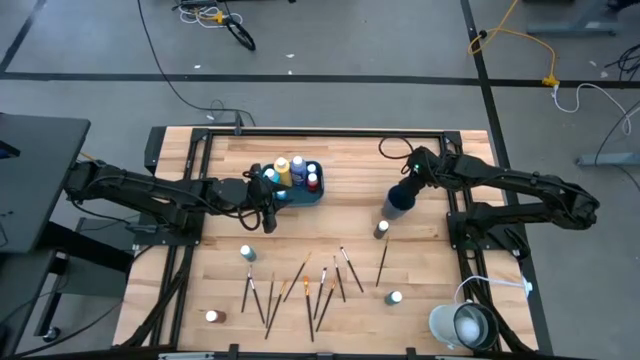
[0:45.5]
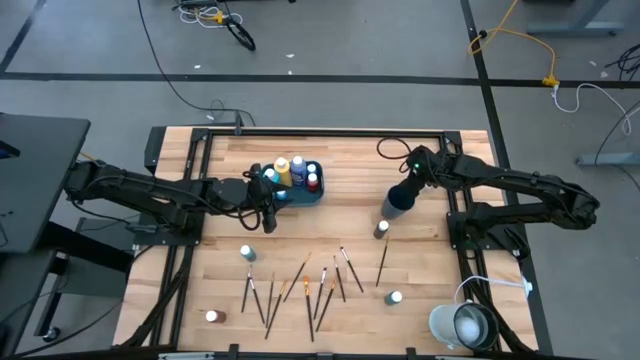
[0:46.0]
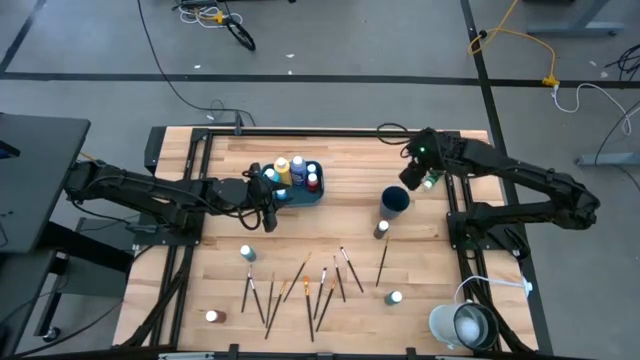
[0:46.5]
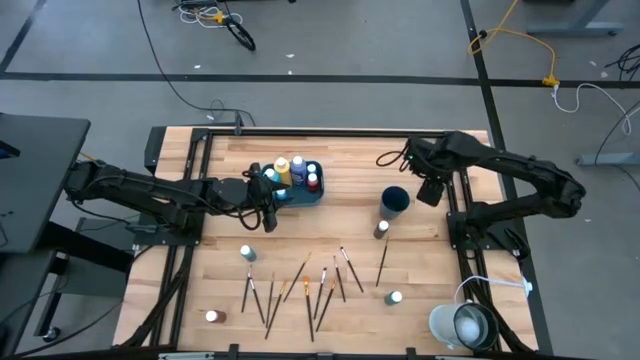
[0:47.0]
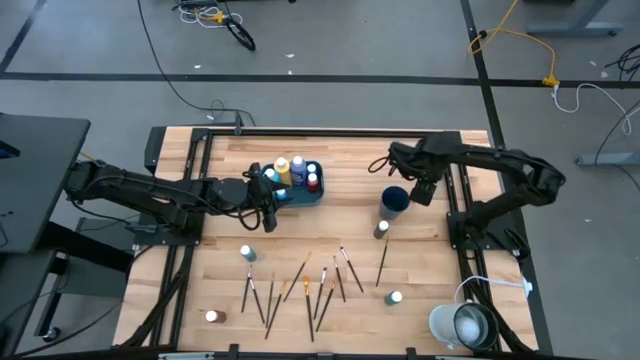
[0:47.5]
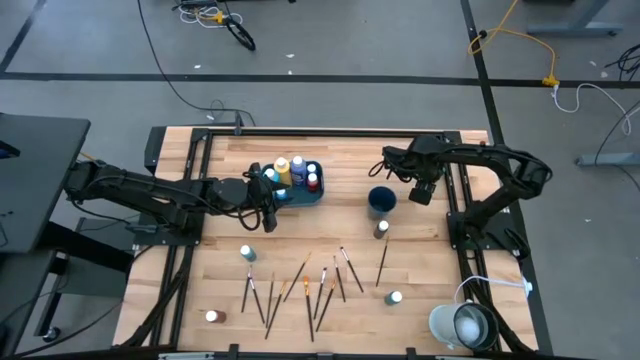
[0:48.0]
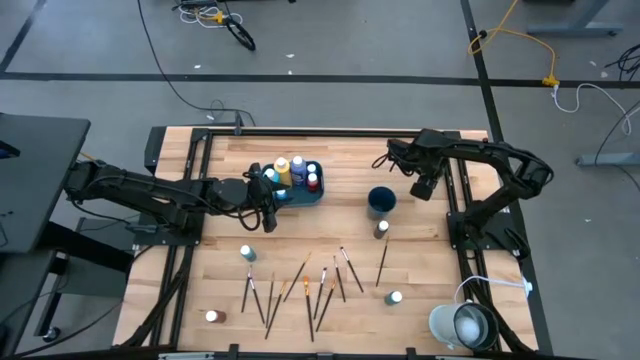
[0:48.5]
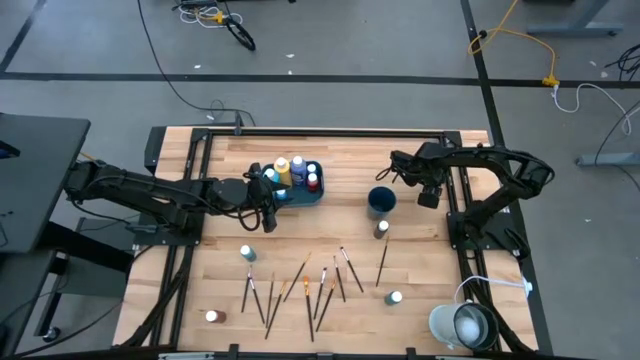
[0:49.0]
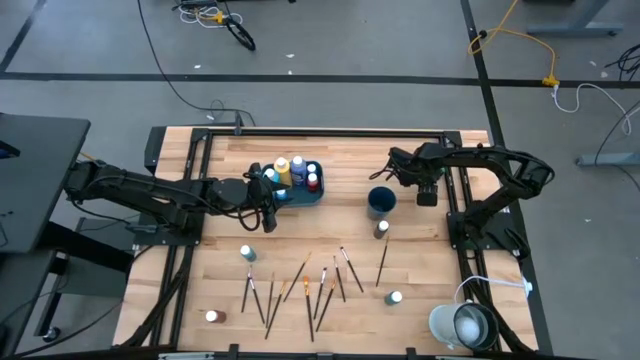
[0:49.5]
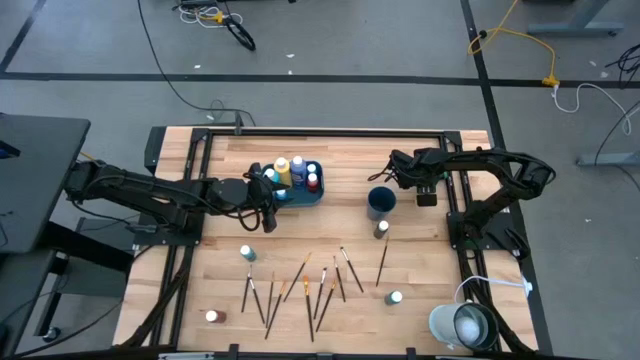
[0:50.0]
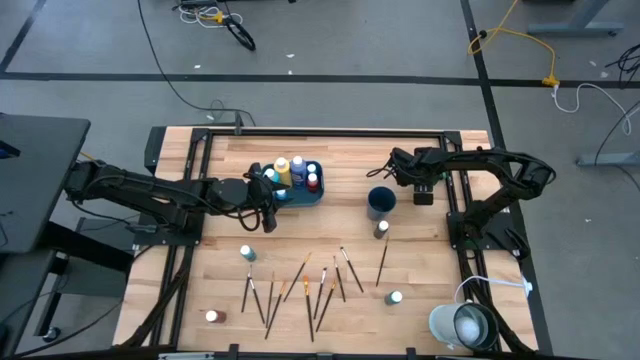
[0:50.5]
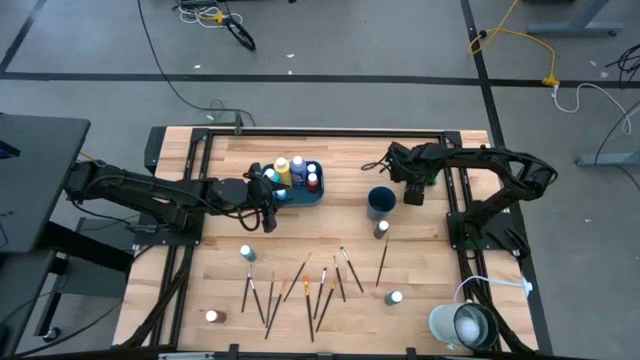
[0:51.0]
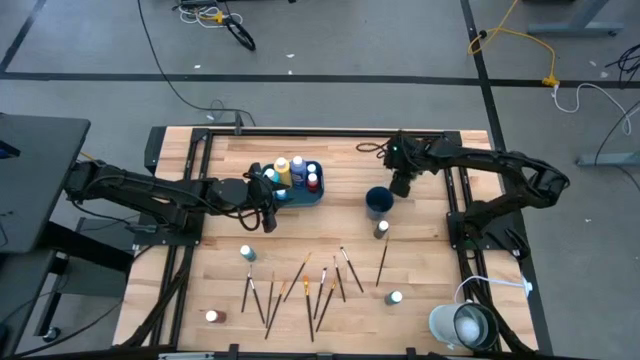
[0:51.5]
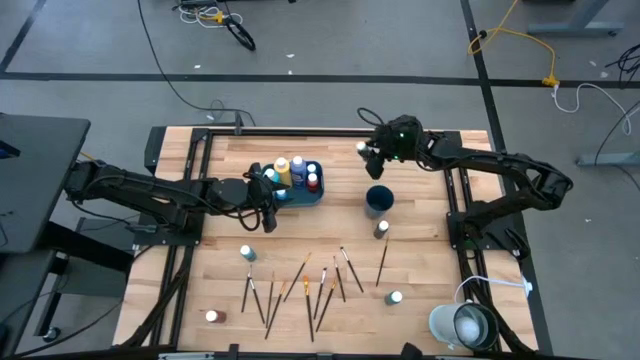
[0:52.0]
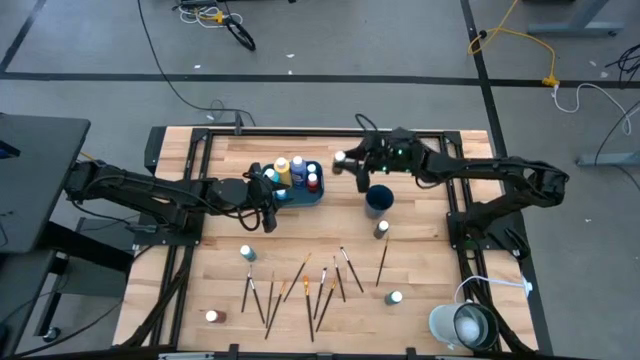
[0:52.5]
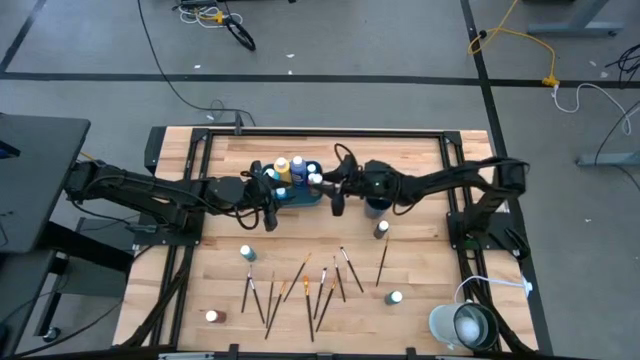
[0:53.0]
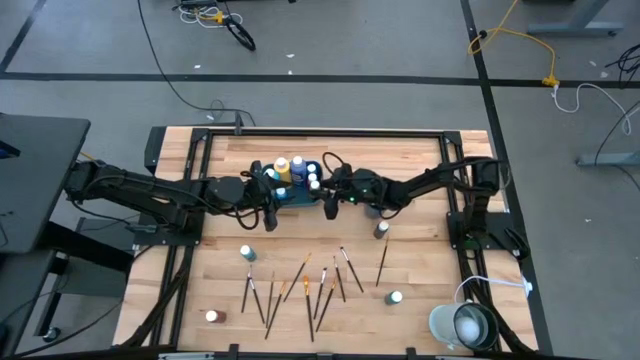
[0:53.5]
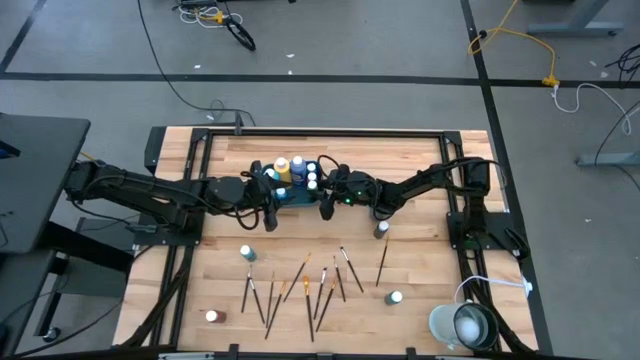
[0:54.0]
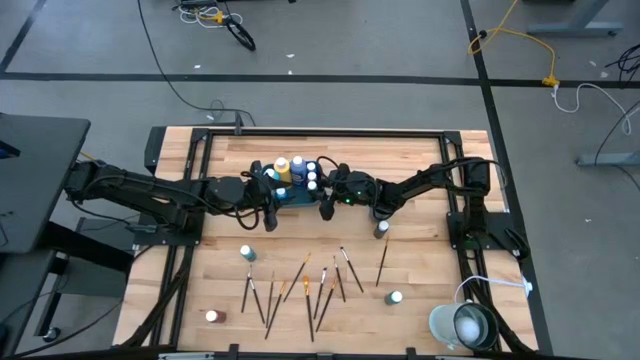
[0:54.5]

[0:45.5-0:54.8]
Task: Pick & Place Paint Supplies
Put the green paint bottle into the blue bin

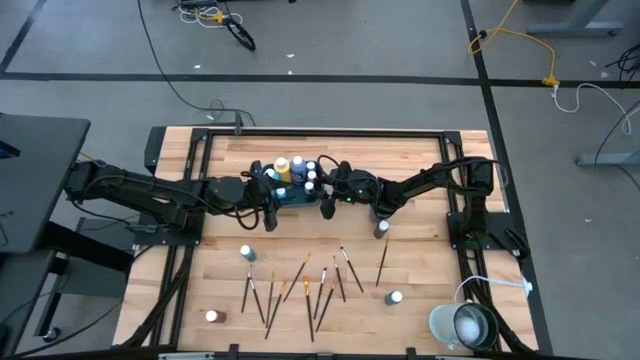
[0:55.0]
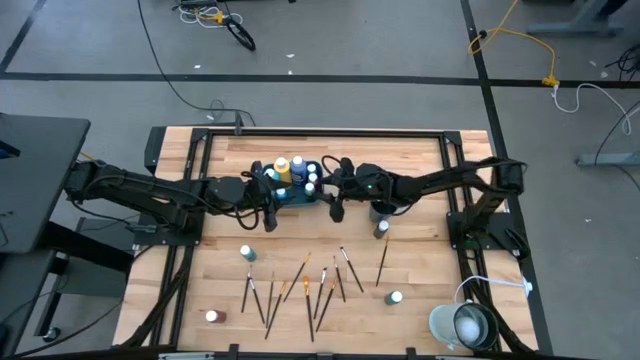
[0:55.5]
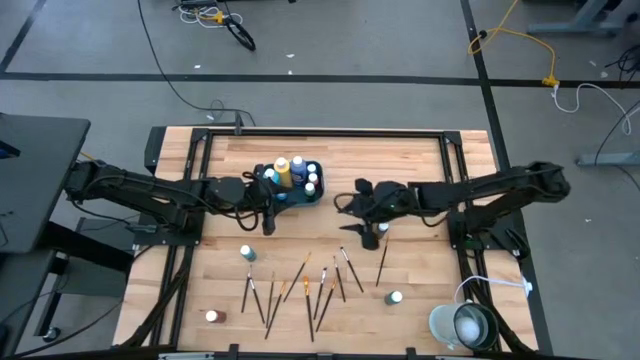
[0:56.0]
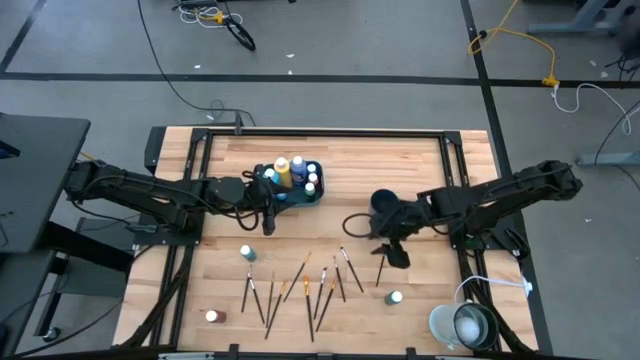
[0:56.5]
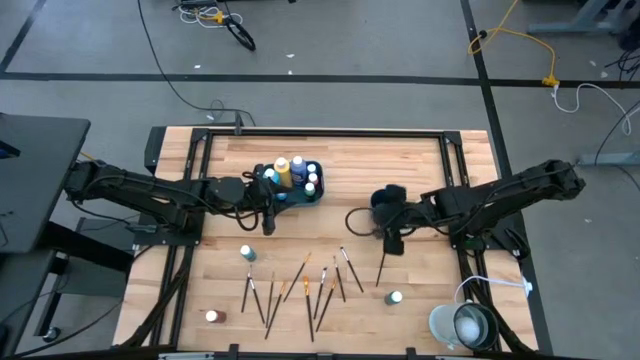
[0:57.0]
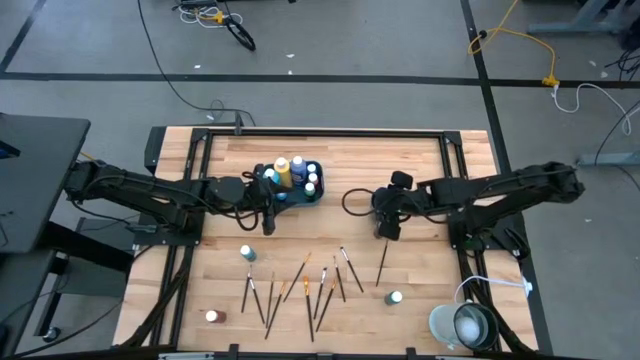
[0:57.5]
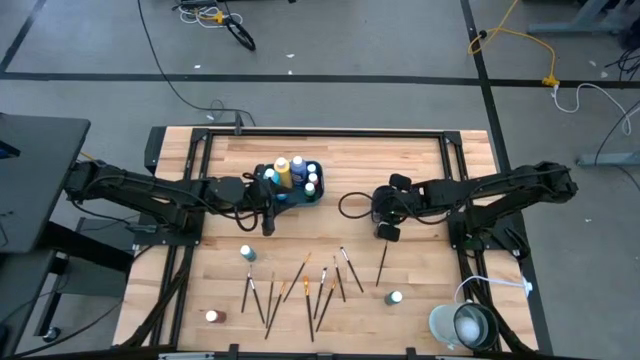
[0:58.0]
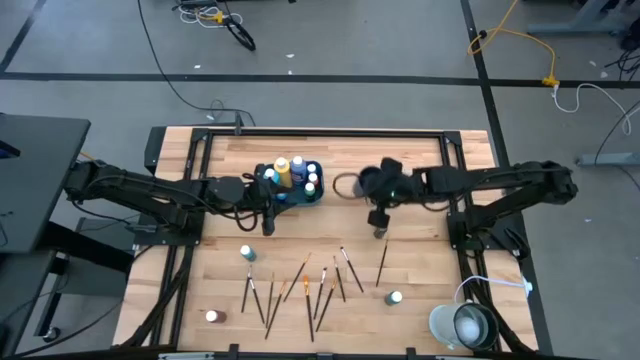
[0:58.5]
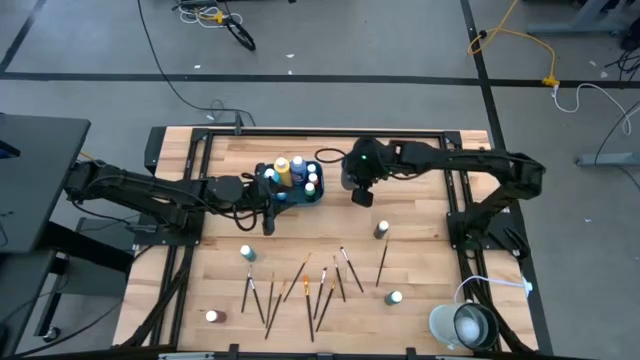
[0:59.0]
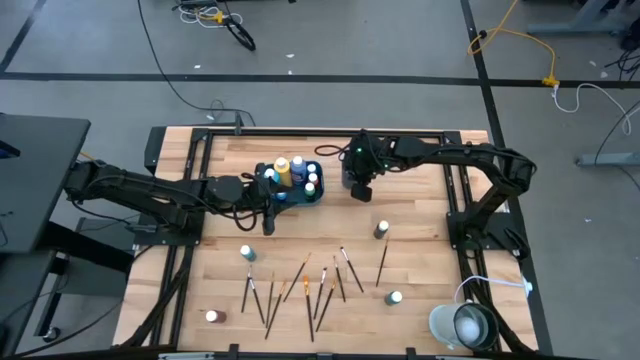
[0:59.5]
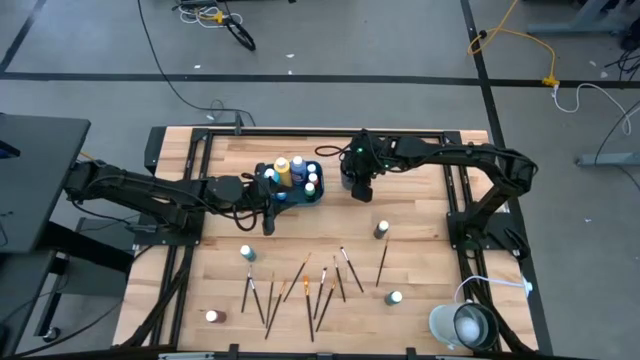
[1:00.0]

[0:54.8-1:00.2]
Adjust the blue cup

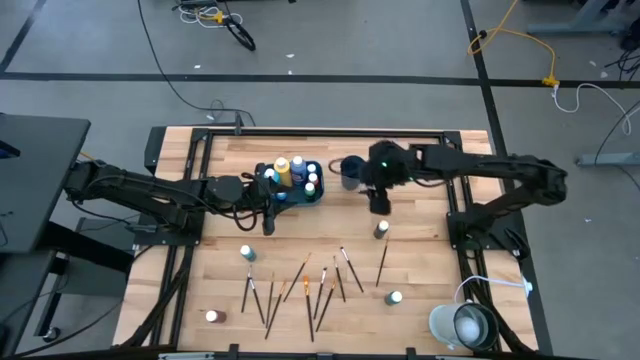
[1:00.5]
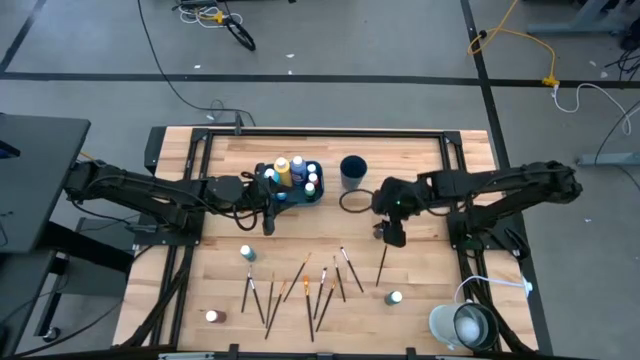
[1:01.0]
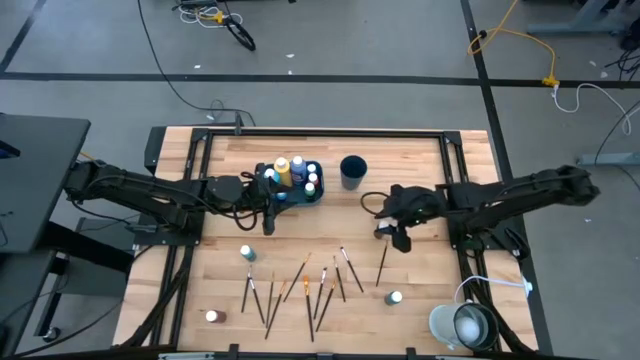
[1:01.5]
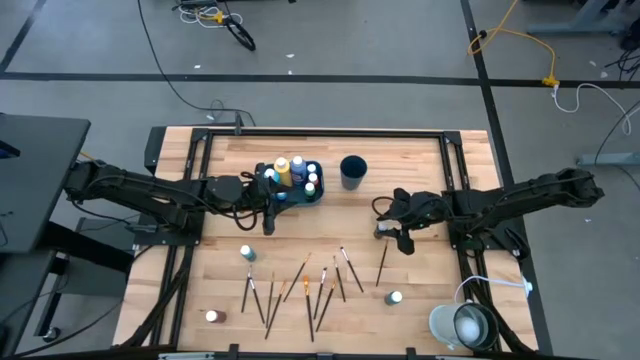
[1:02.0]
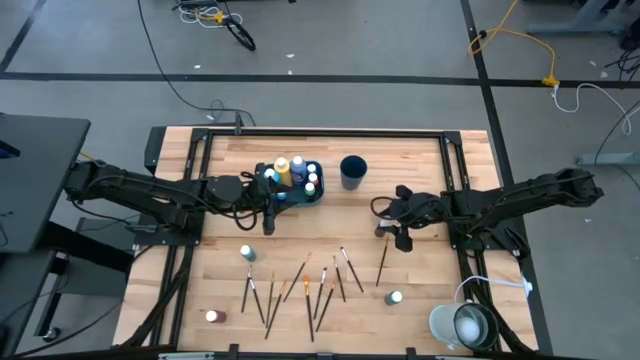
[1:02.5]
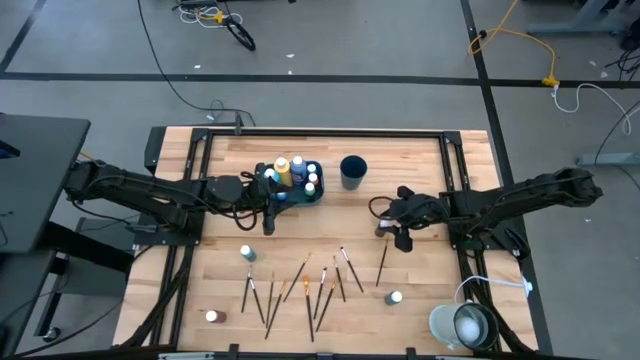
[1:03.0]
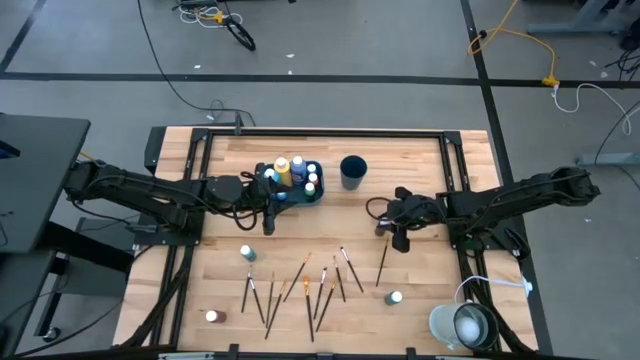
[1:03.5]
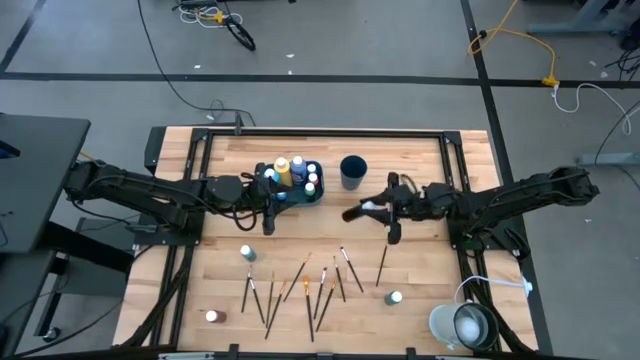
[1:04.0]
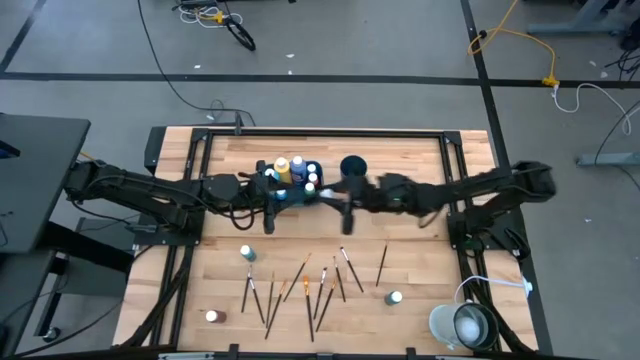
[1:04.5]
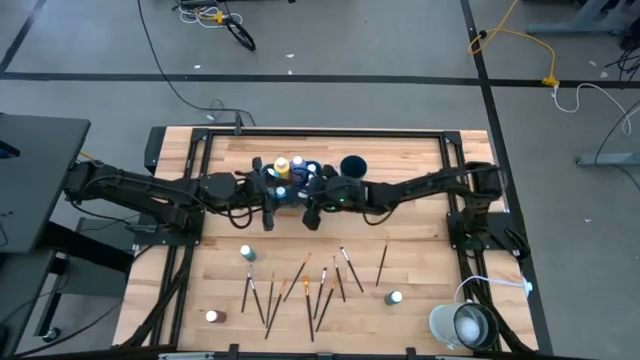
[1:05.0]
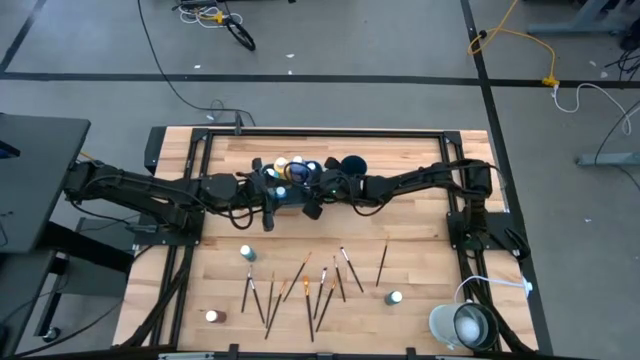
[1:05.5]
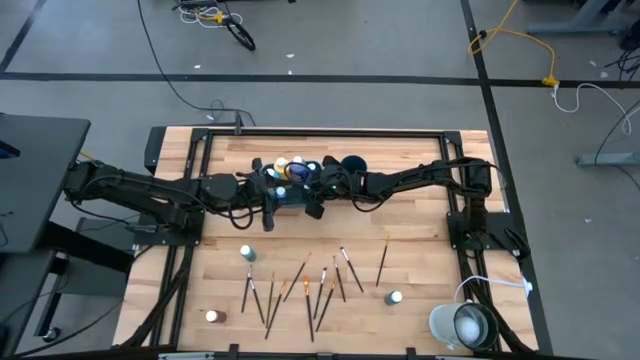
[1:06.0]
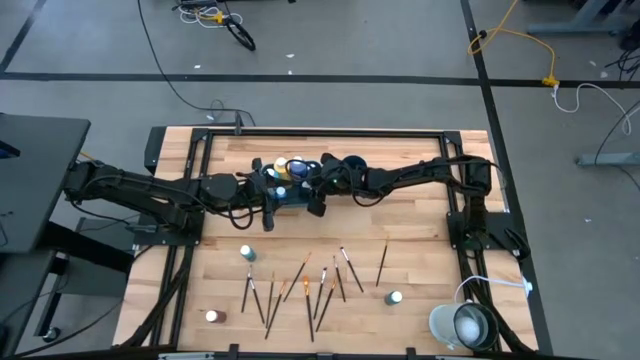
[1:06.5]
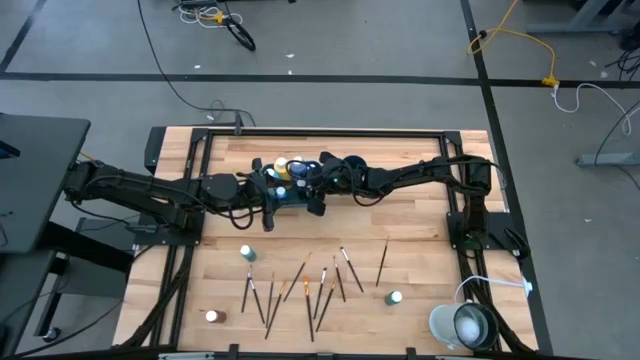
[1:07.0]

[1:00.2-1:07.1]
Put the black paint bottle into the blue bin
